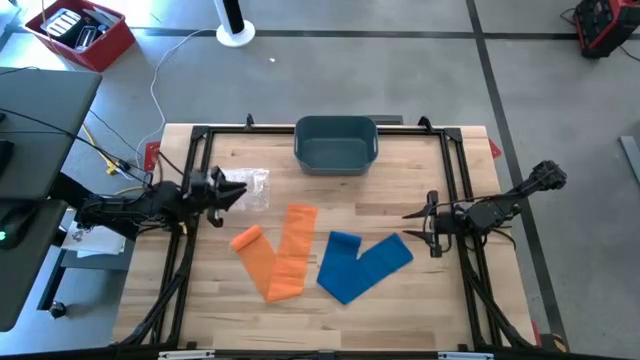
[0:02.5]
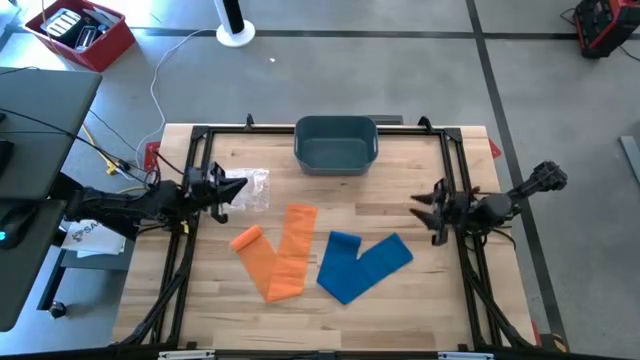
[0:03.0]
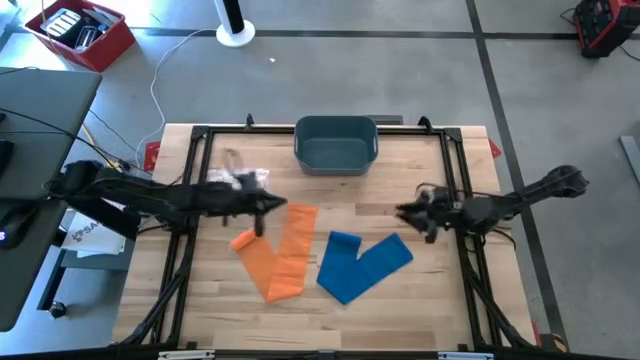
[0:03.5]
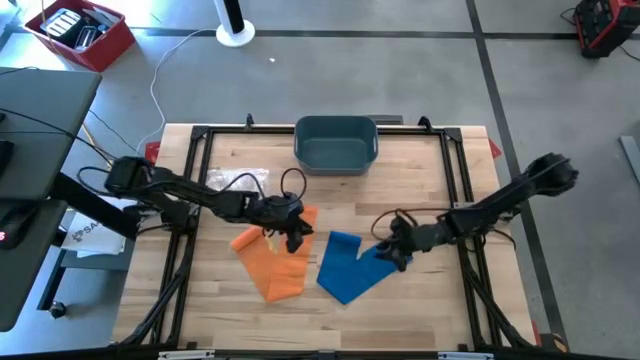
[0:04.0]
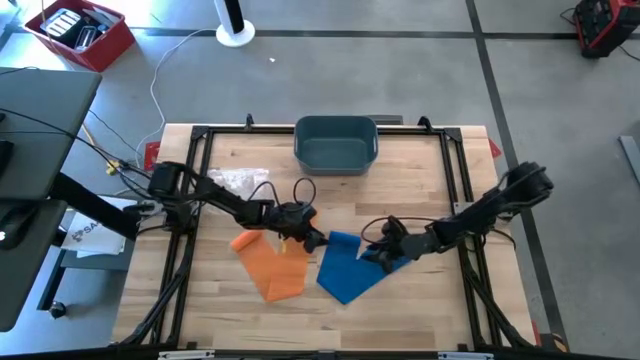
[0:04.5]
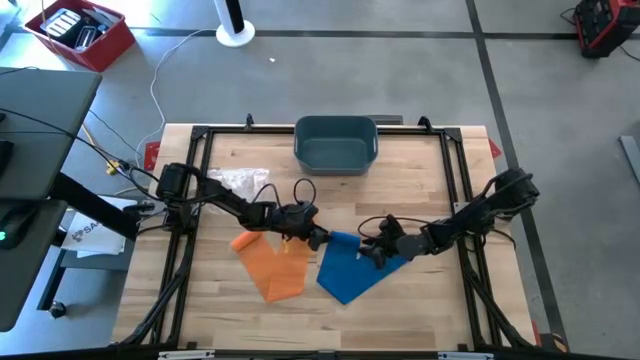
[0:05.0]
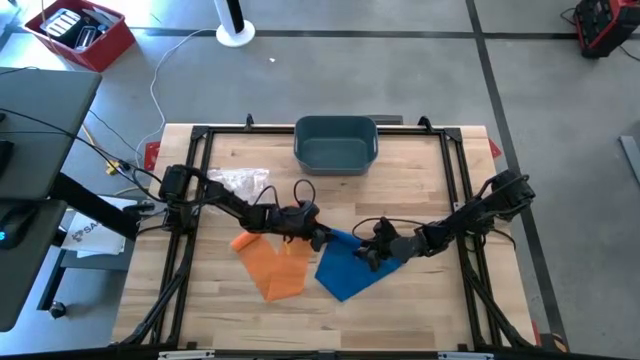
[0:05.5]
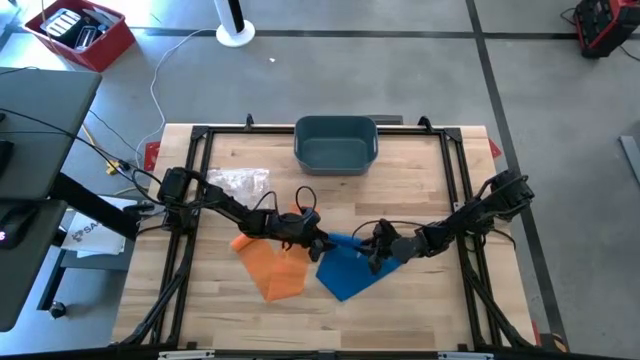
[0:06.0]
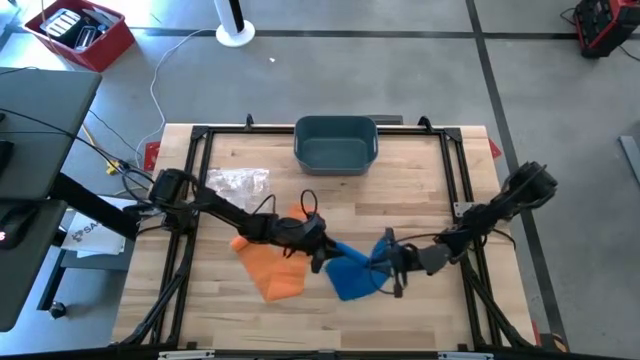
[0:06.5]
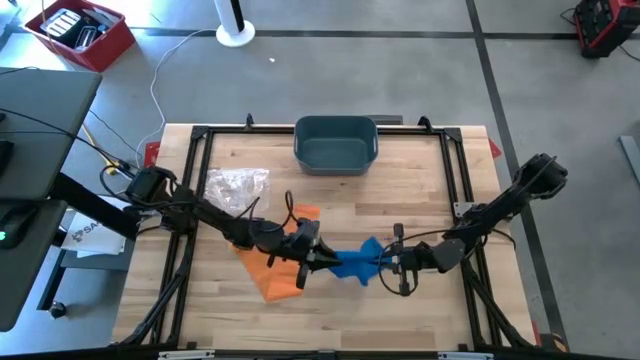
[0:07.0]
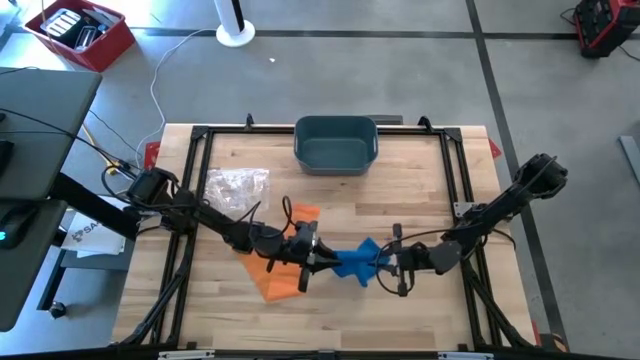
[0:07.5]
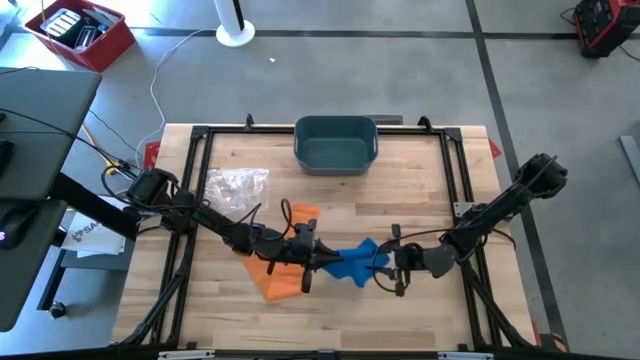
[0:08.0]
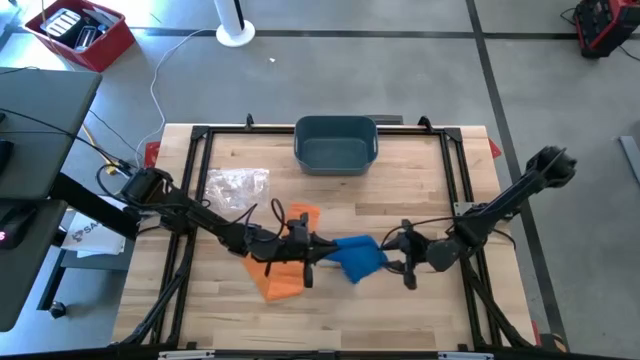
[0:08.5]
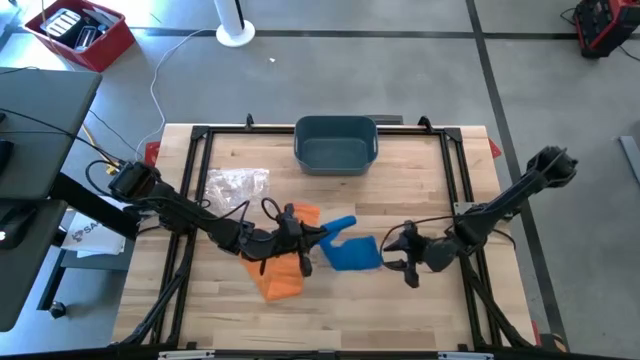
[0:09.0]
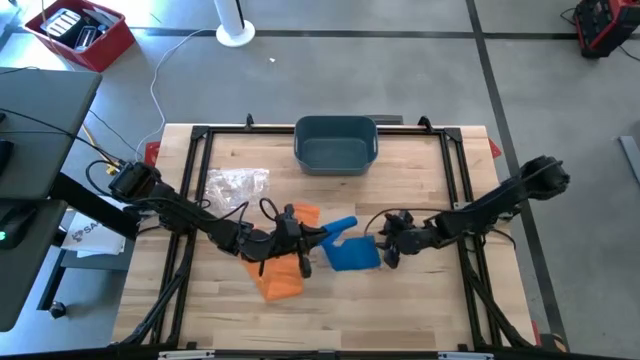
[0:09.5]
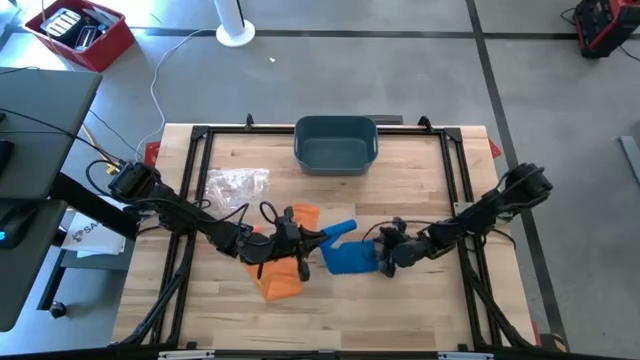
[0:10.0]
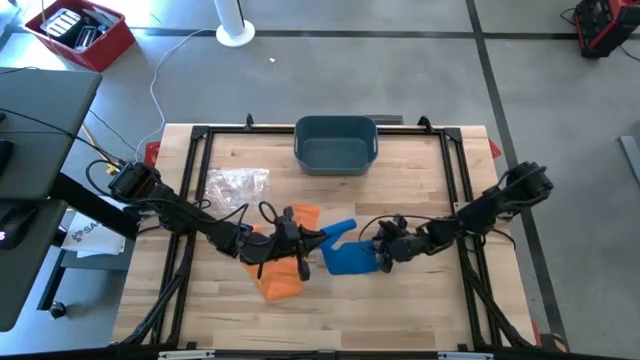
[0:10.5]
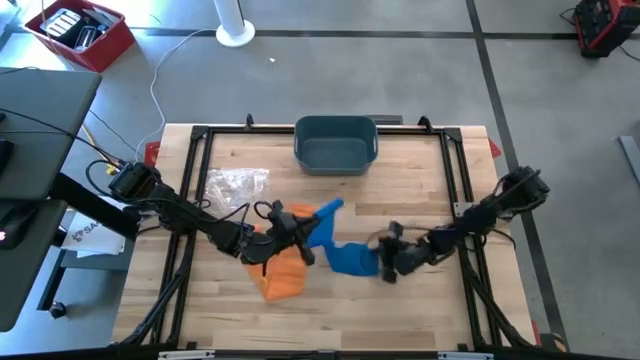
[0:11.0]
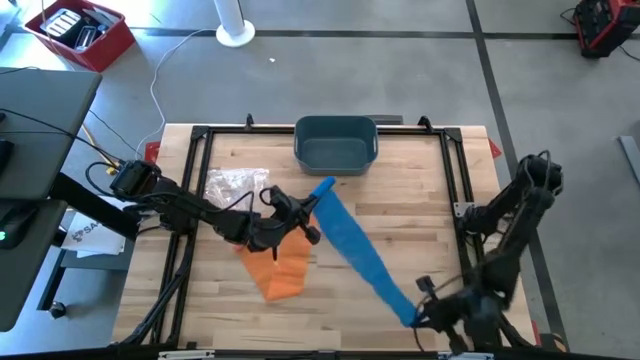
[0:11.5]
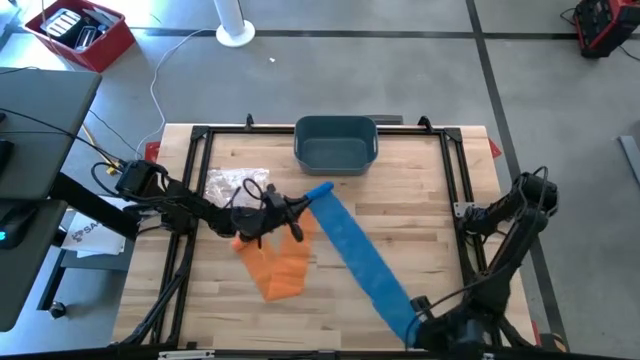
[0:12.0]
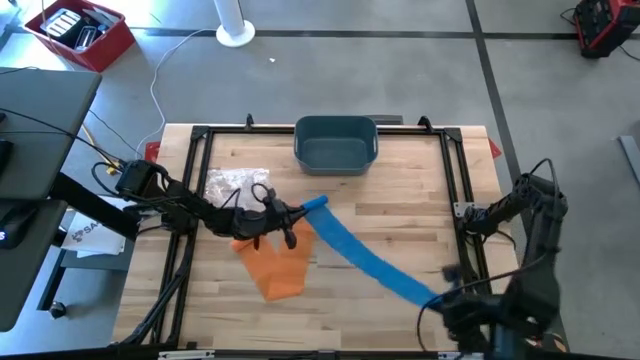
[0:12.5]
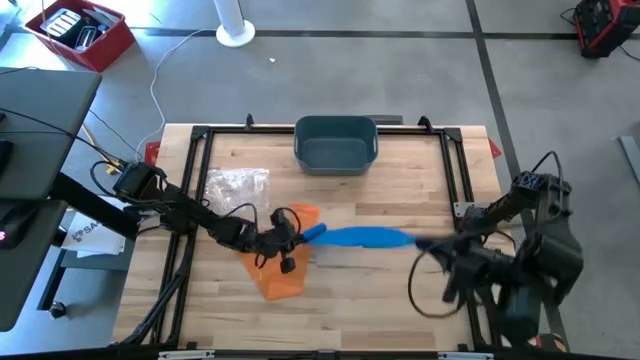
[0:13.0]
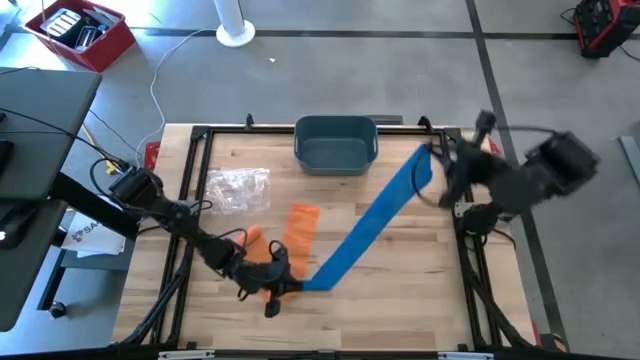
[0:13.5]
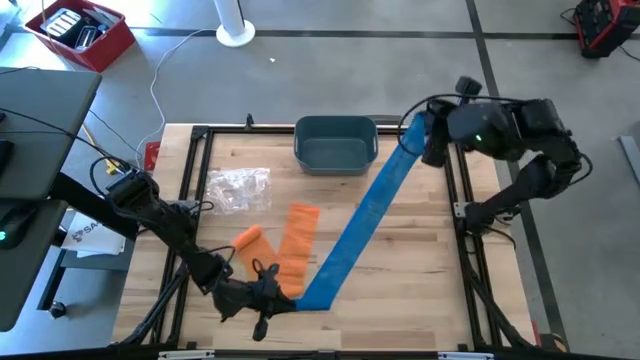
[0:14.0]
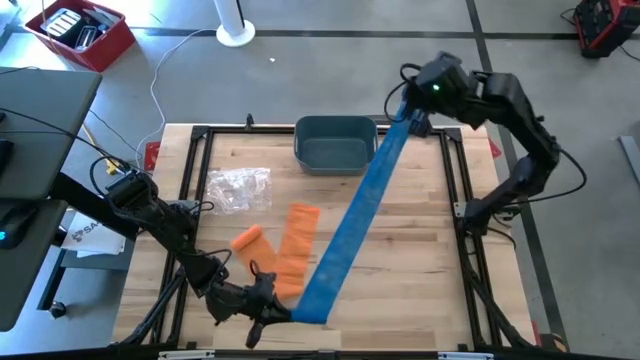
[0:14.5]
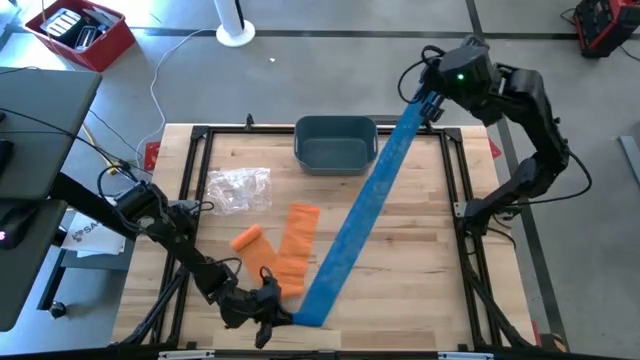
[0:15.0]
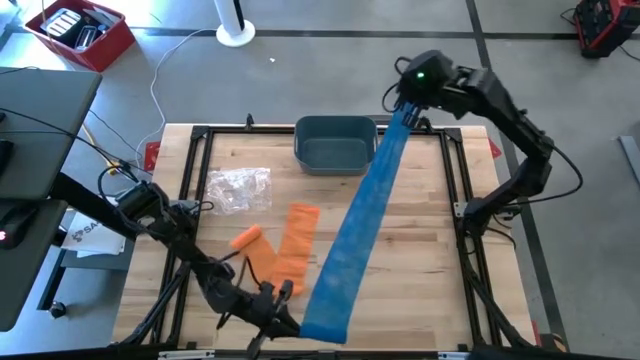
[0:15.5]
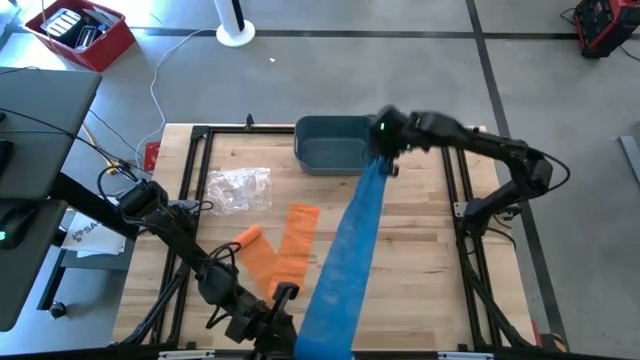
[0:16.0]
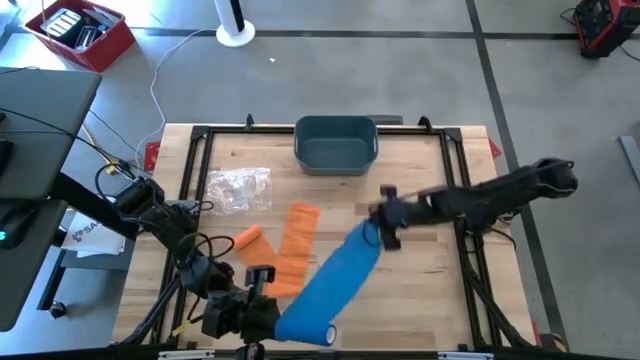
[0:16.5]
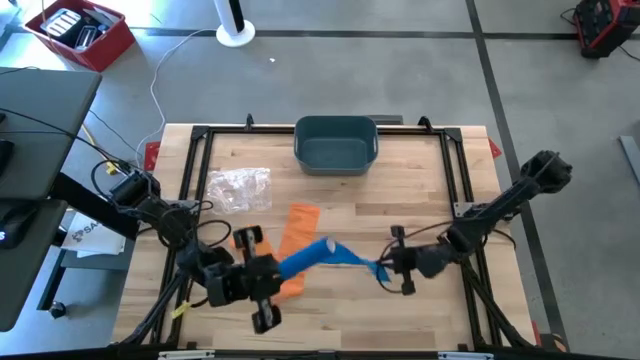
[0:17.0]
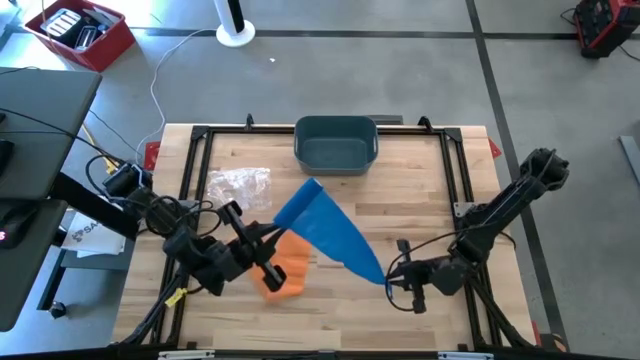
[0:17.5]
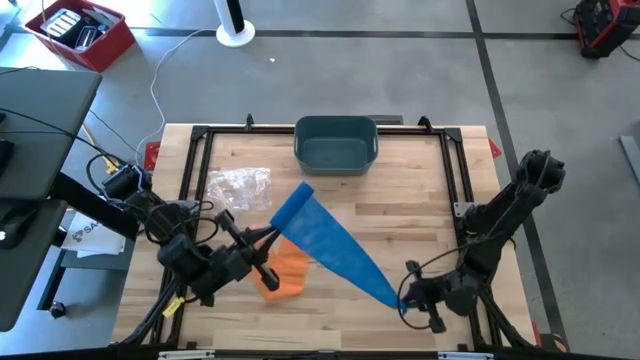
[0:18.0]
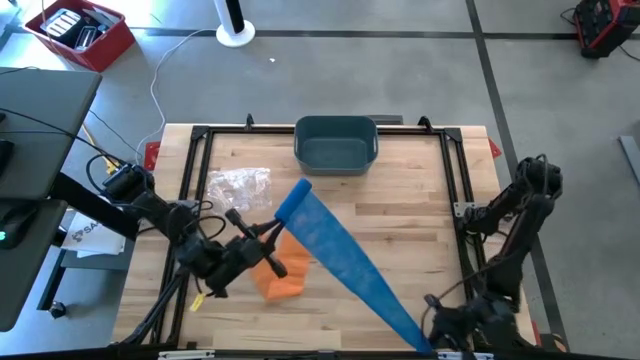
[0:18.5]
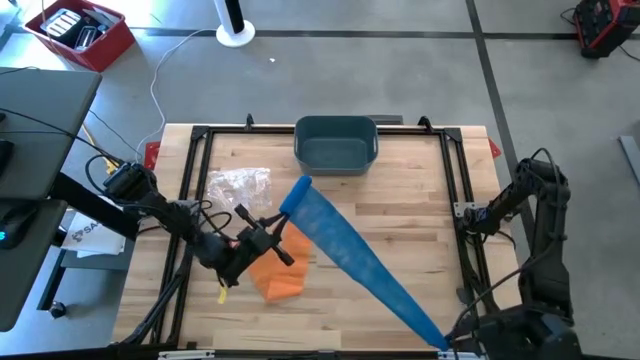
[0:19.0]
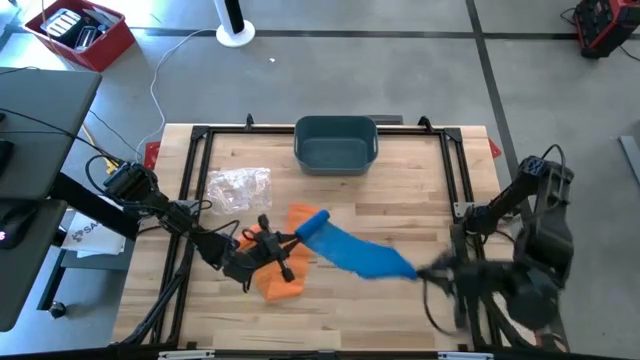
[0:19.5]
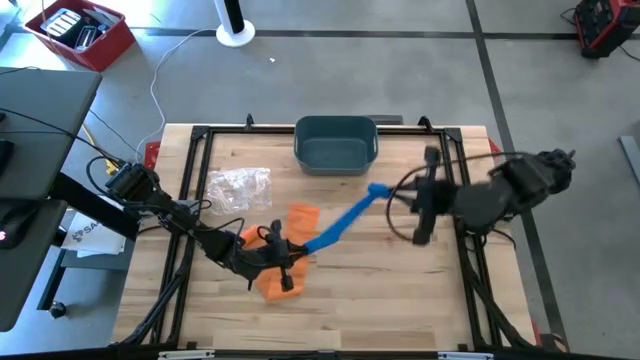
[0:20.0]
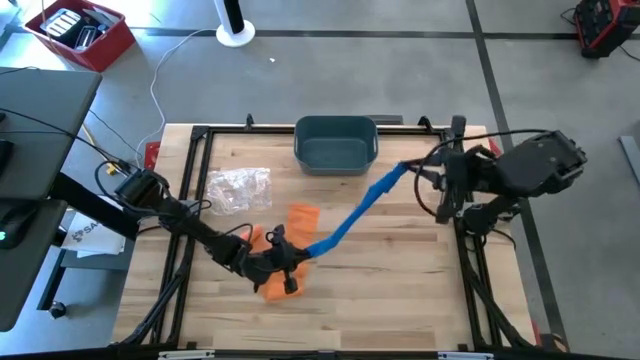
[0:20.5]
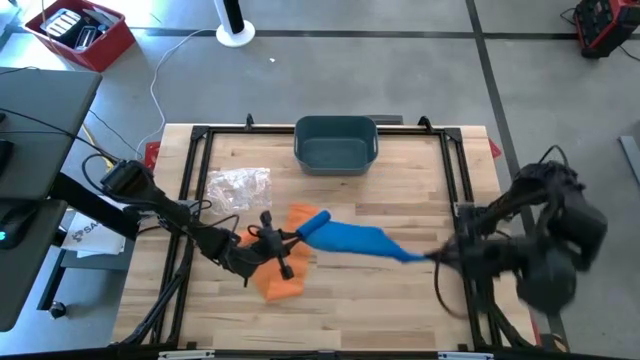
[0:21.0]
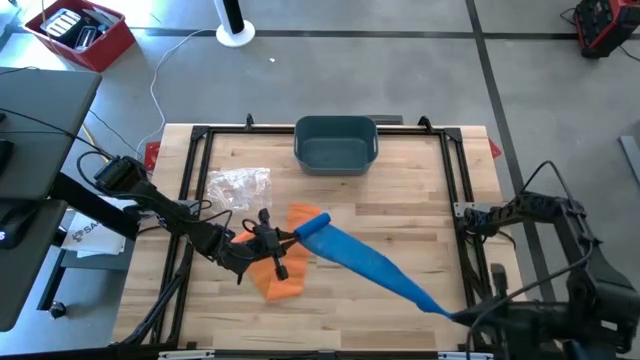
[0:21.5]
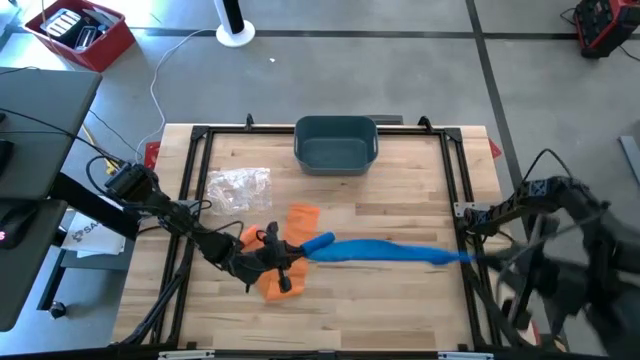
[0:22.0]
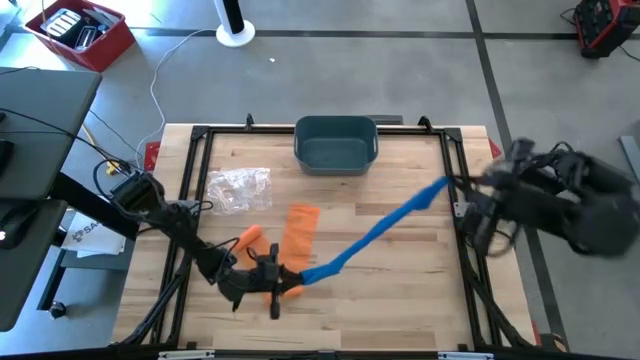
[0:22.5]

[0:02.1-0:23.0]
Task: Roll bandage
Roll the blue bandage
